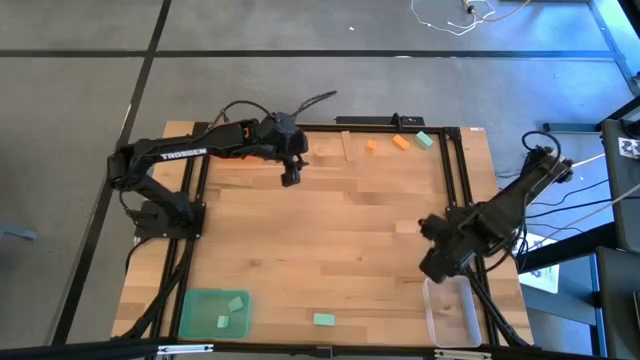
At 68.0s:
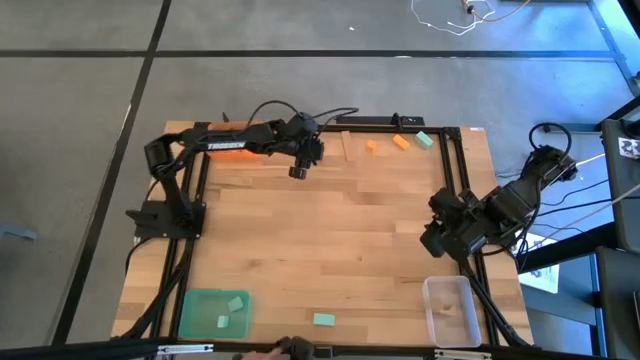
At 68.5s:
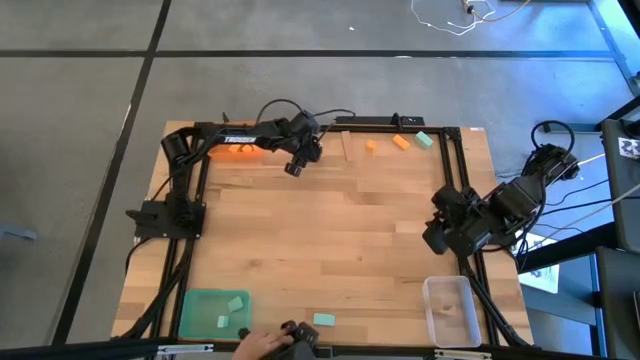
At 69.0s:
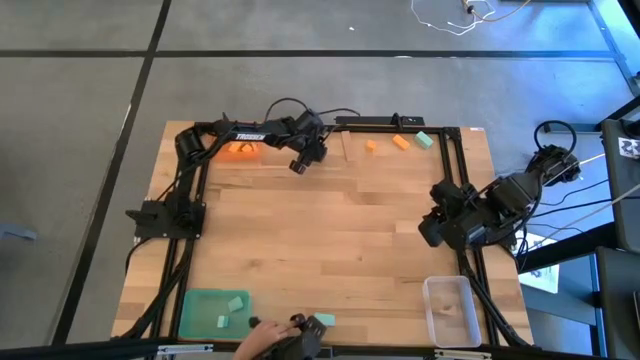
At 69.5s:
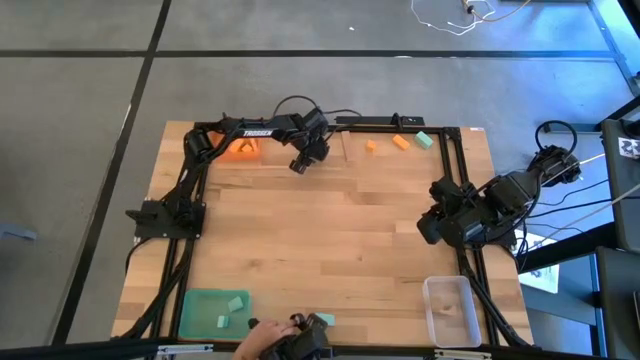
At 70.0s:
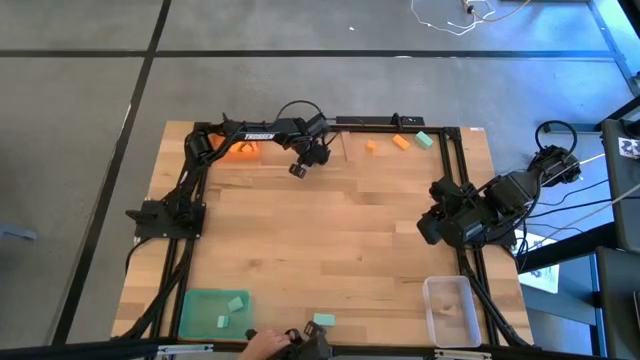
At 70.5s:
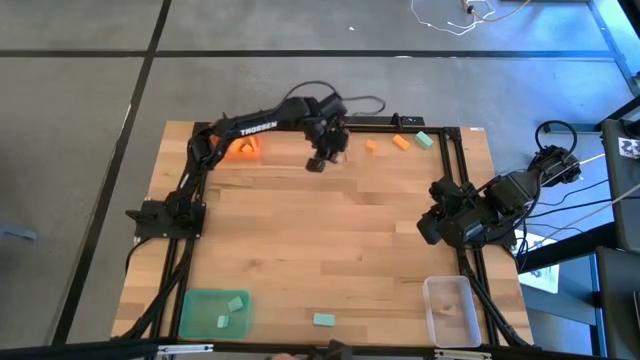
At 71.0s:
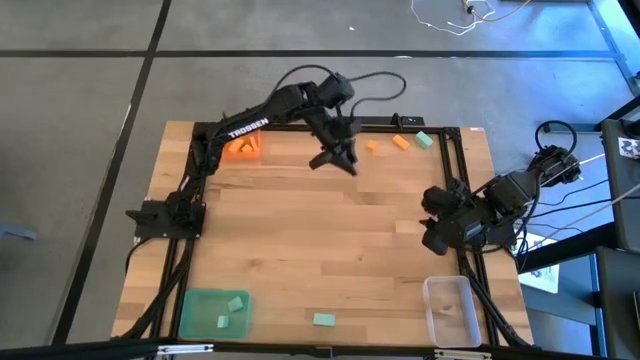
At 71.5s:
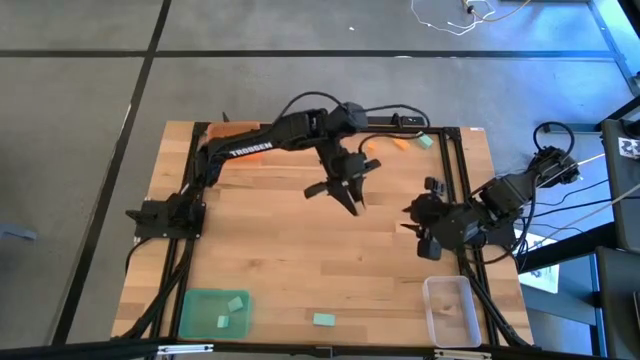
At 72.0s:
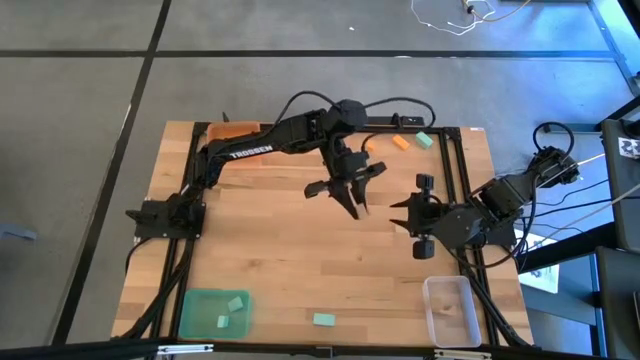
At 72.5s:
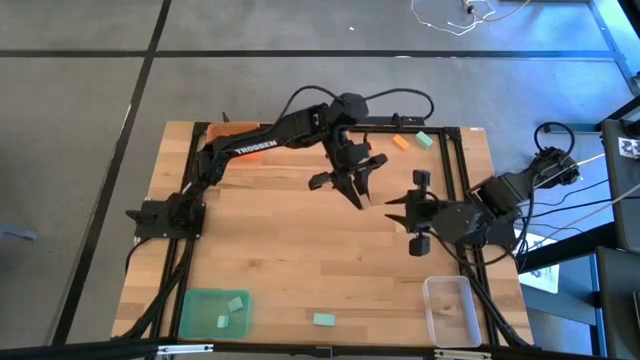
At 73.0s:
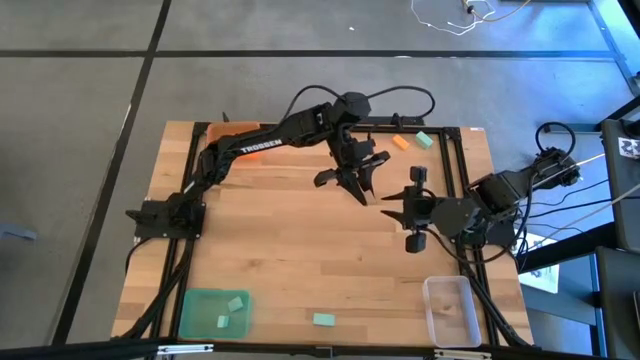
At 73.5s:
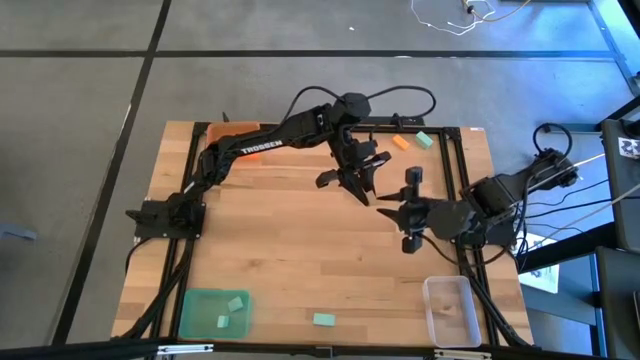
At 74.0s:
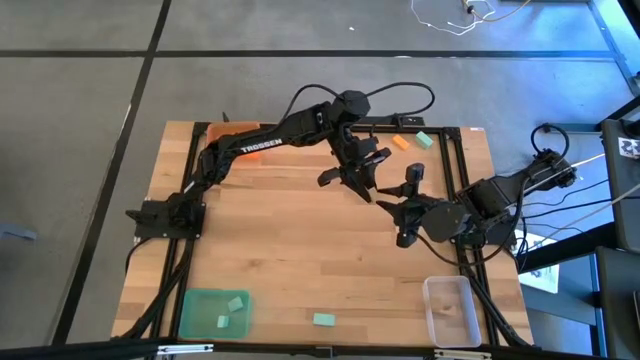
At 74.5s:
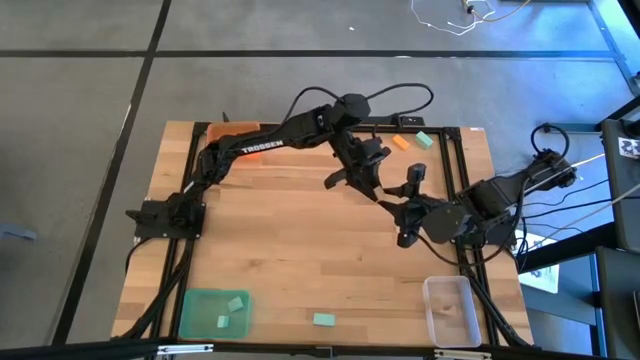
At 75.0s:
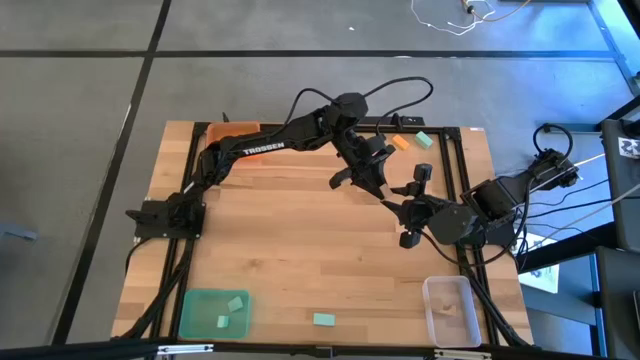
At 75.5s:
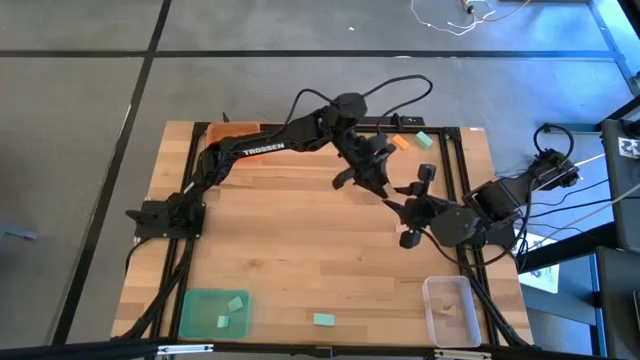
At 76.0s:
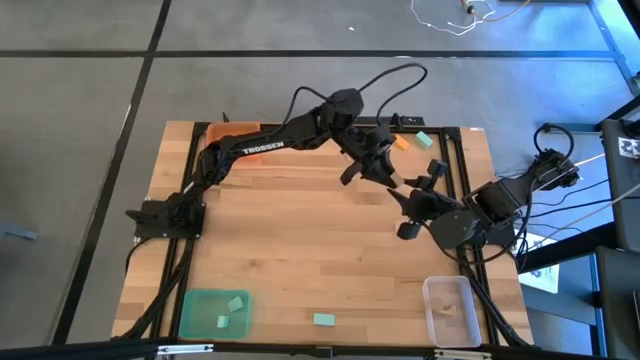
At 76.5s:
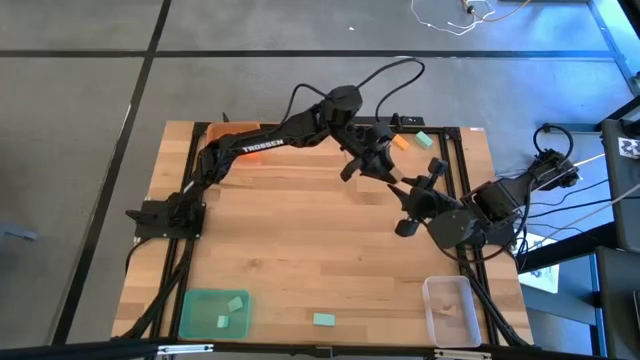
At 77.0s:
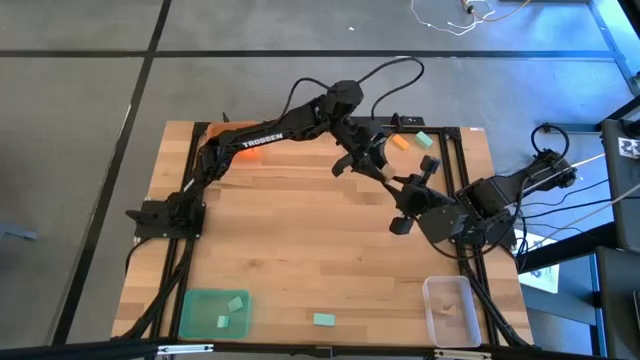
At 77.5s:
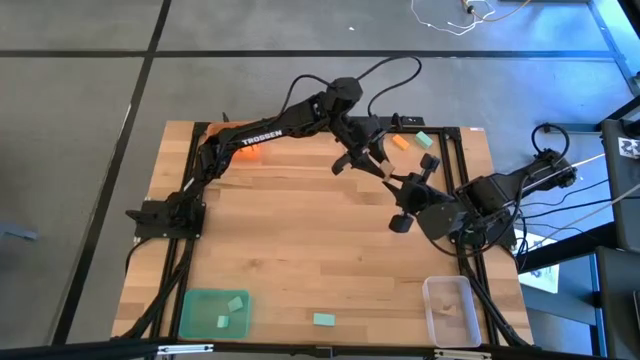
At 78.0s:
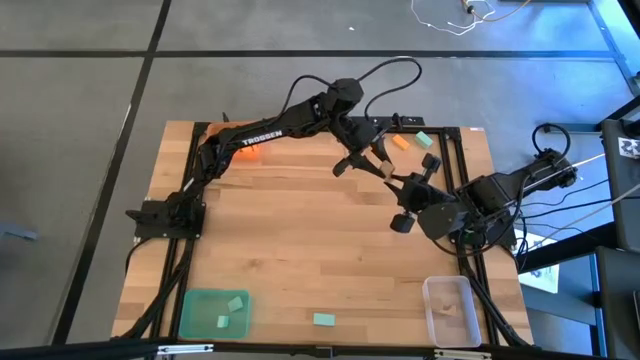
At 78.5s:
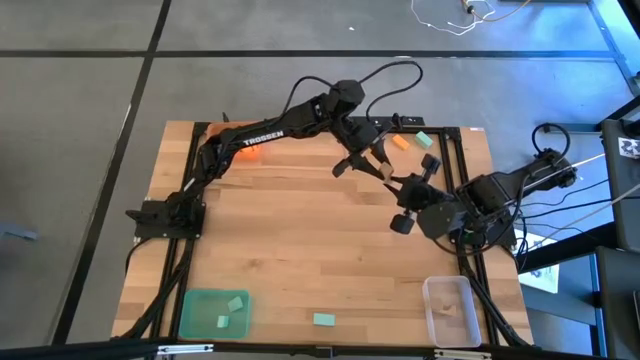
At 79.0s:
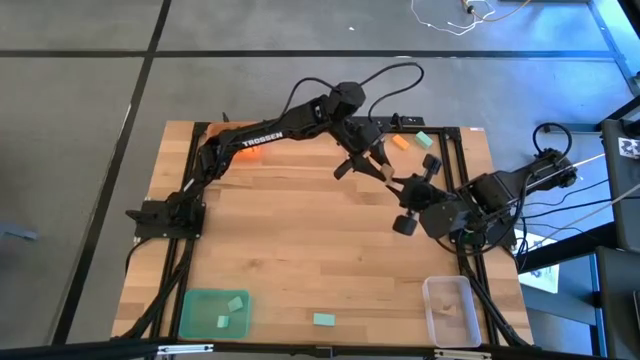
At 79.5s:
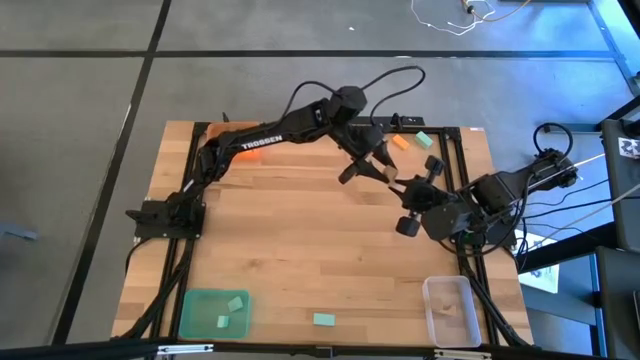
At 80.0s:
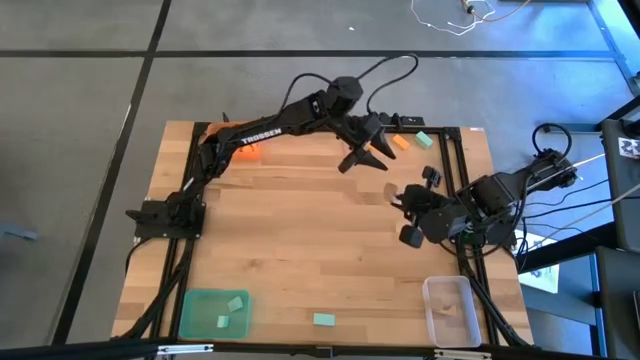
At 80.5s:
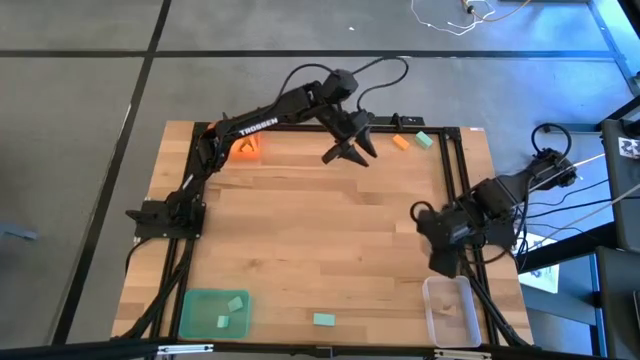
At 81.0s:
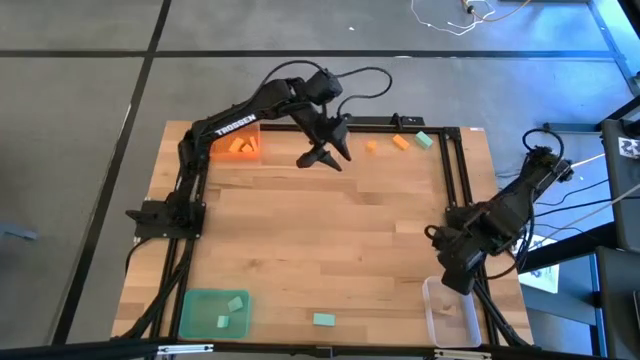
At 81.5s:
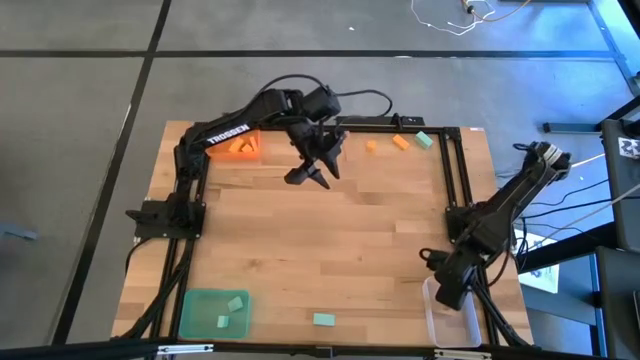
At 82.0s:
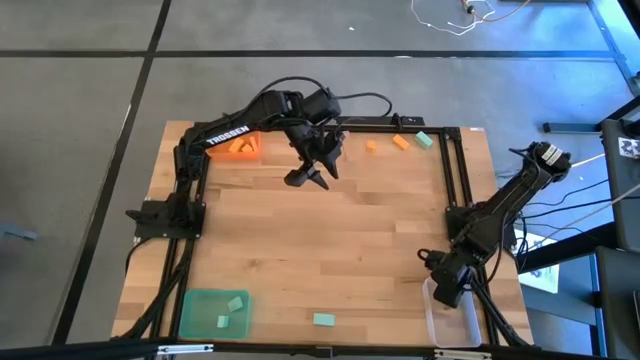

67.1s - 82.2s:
Task: Sort & place blocks by color
Put the brown block into the transparent bin

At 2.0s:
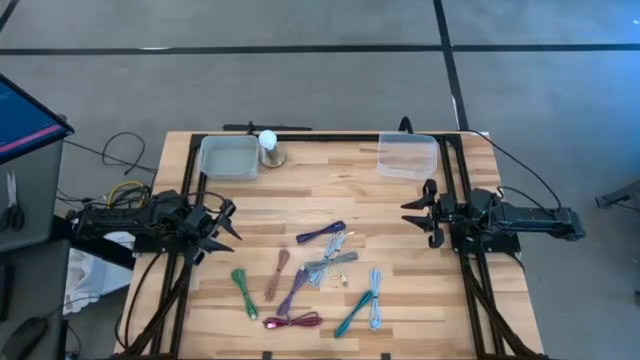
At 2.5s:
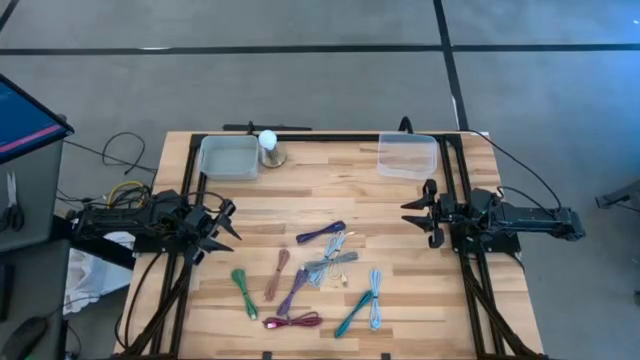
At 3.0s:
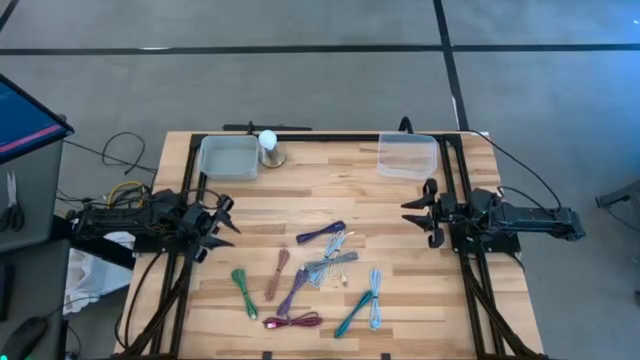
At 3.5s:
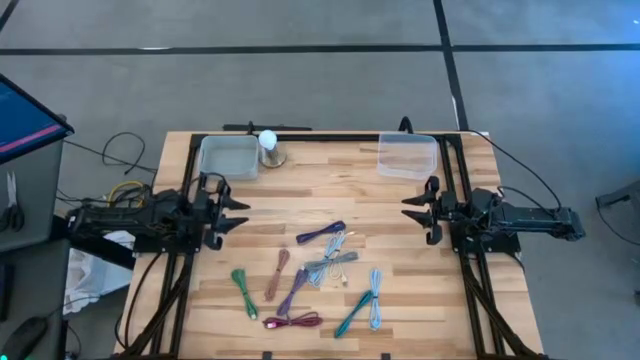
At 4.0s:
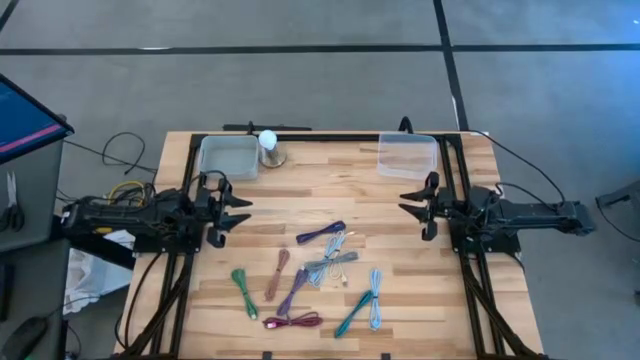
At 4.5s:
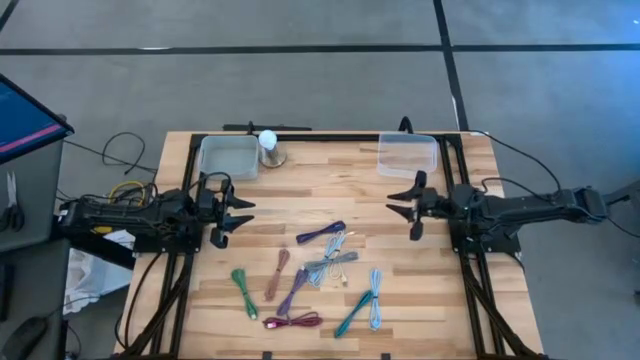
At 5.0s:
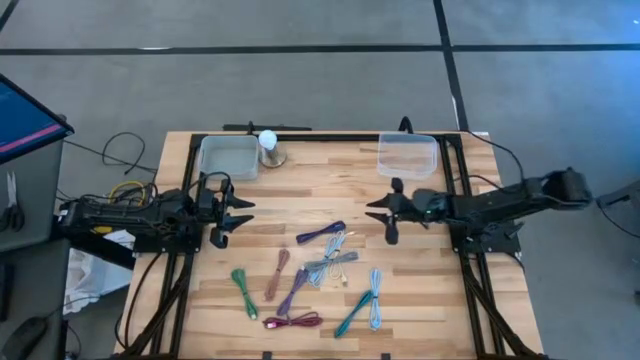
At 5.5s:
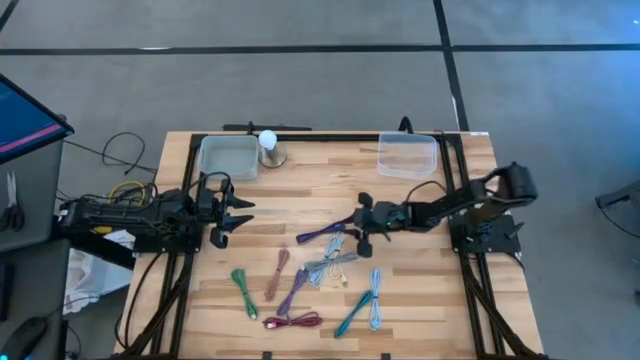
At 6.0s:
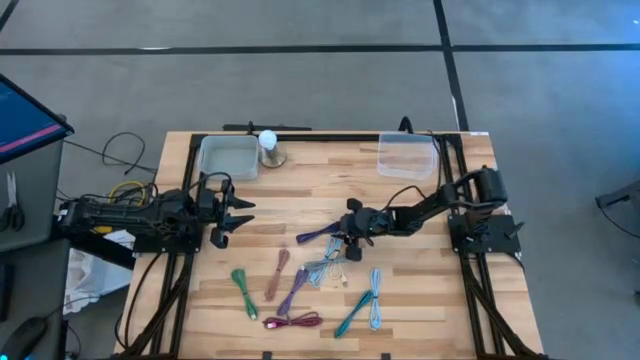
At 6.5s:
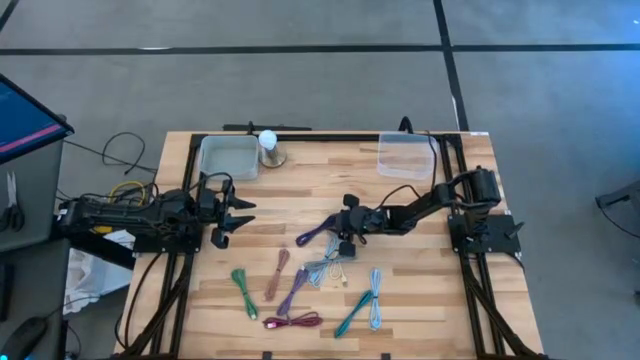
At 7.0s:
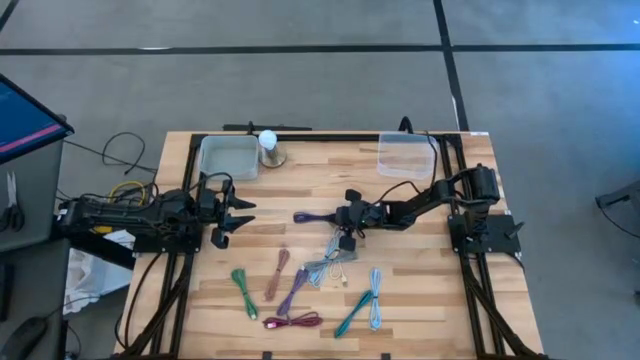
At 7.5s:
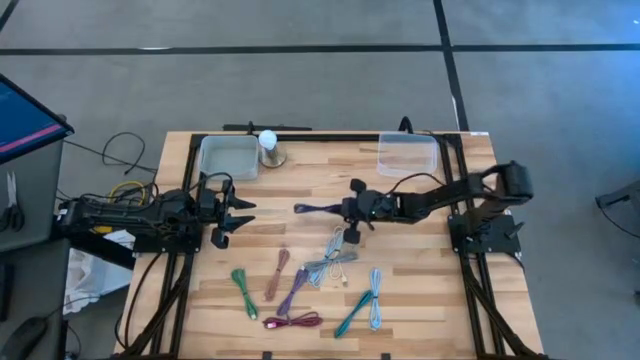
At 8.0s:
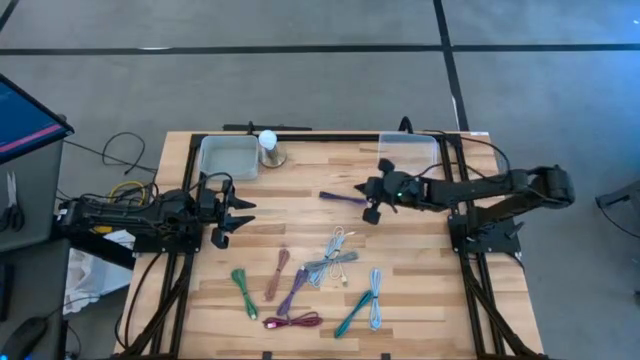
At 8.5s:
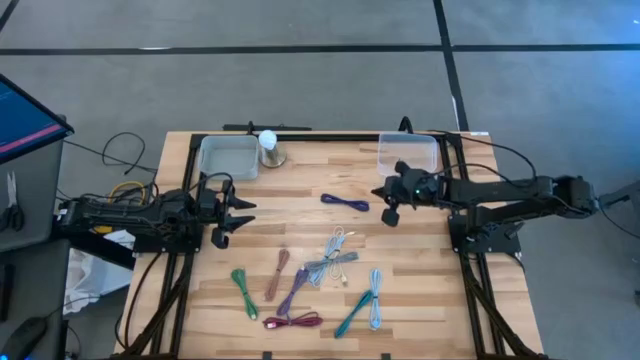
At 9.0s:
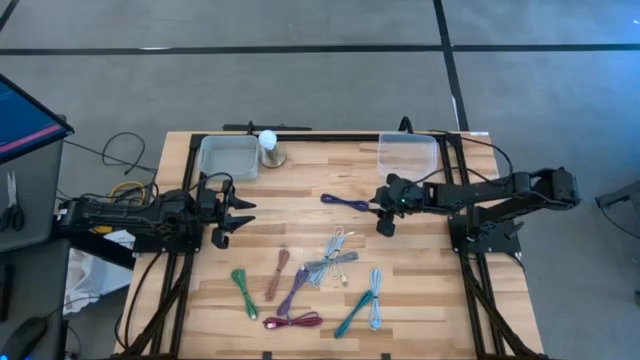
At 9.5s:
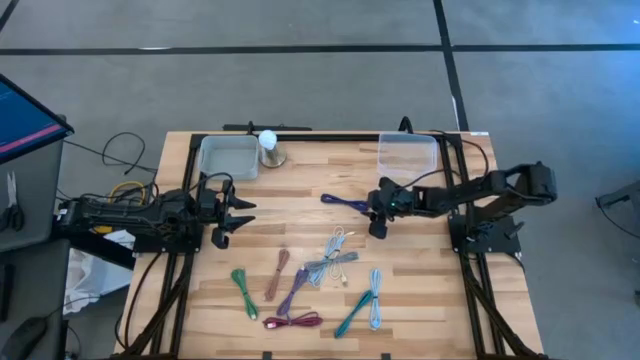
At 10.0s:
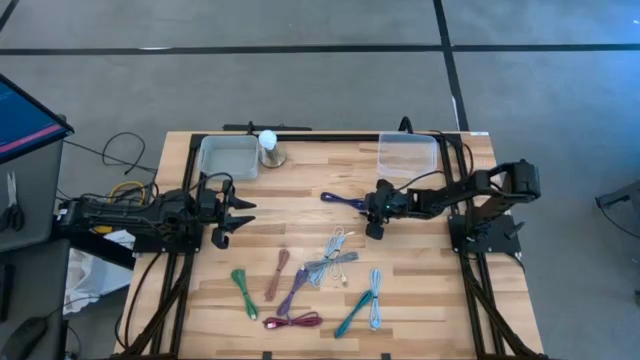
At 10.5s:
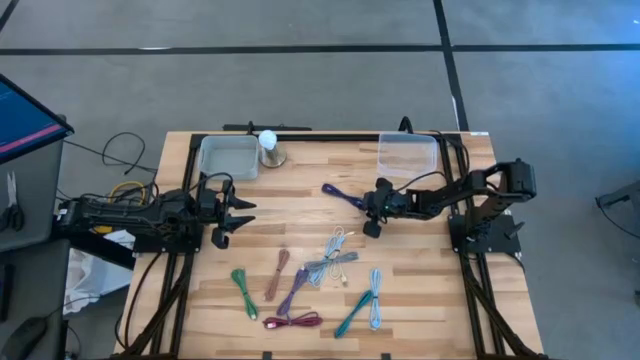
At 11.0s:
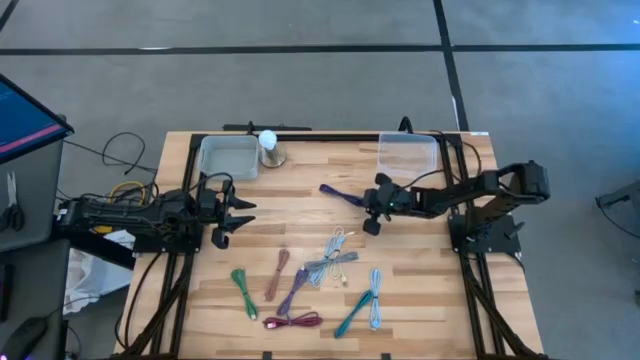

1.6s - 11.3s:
Task: Pick & Place USB Port
Put the dark blue patterned charger cable into the transparent bin
